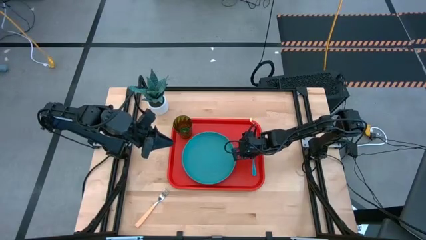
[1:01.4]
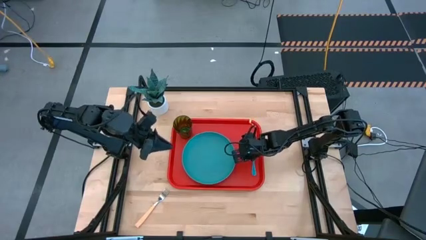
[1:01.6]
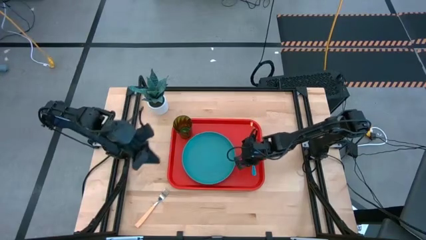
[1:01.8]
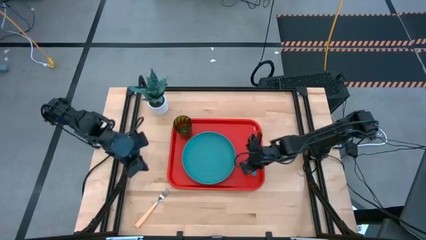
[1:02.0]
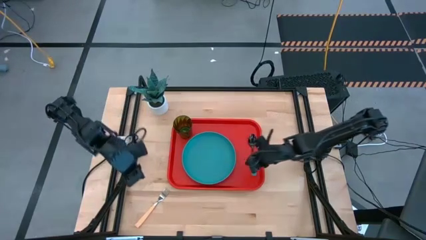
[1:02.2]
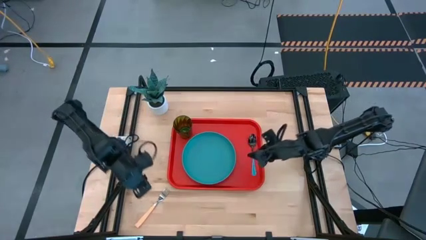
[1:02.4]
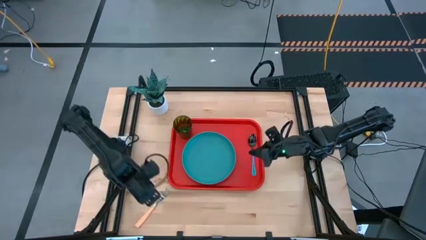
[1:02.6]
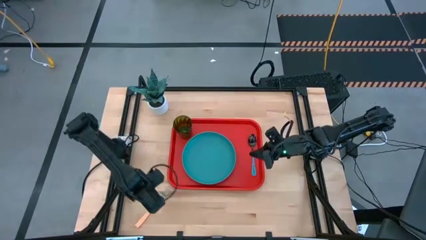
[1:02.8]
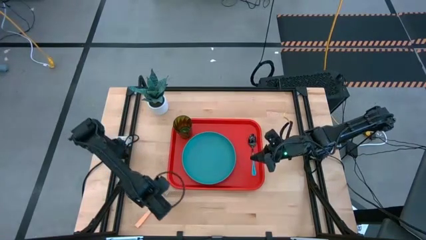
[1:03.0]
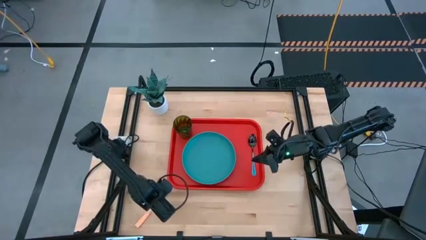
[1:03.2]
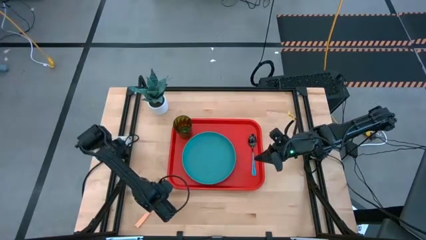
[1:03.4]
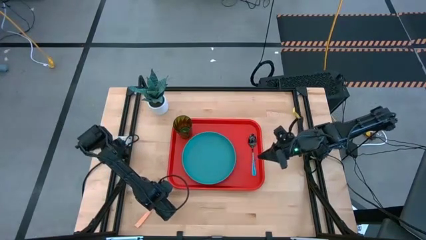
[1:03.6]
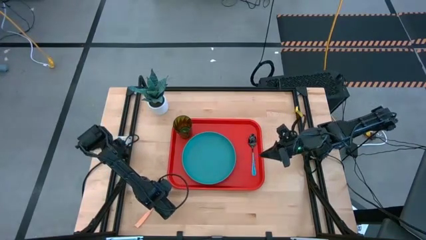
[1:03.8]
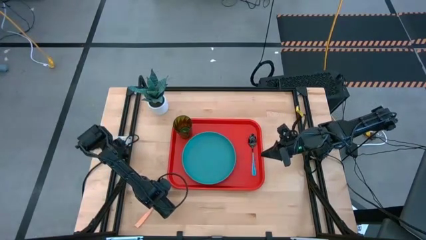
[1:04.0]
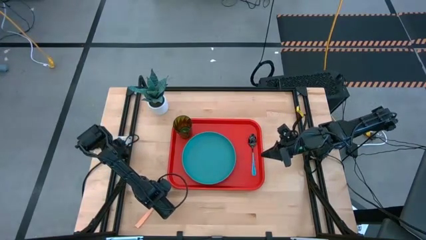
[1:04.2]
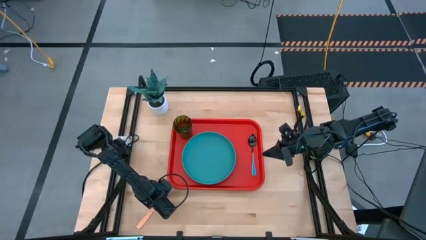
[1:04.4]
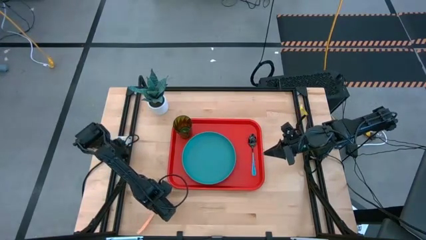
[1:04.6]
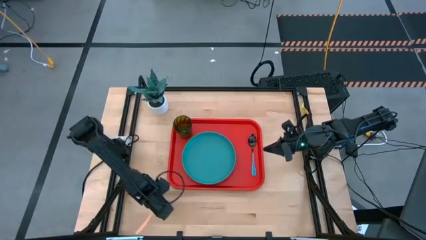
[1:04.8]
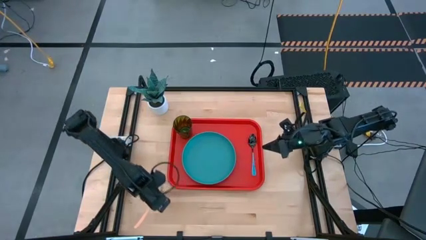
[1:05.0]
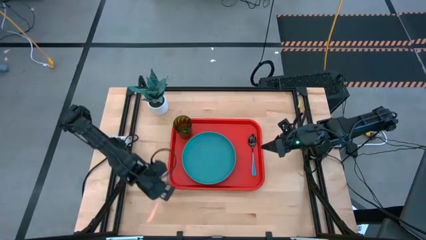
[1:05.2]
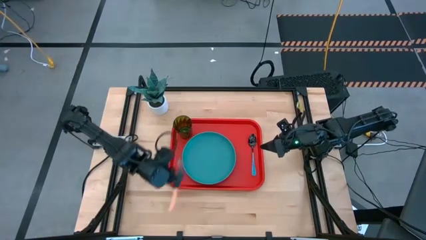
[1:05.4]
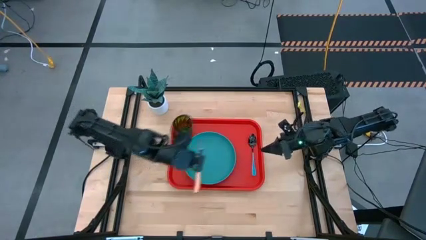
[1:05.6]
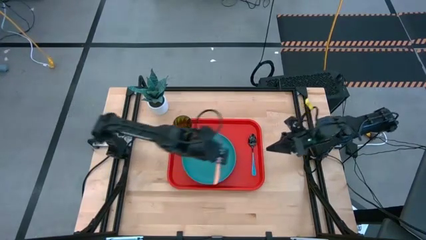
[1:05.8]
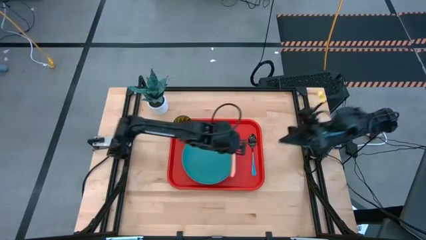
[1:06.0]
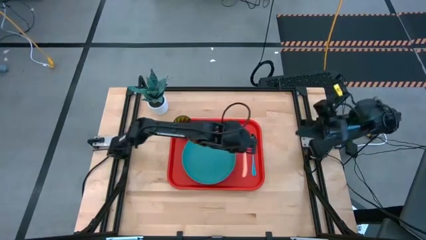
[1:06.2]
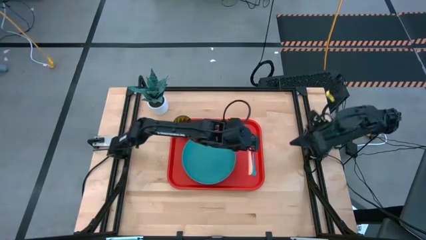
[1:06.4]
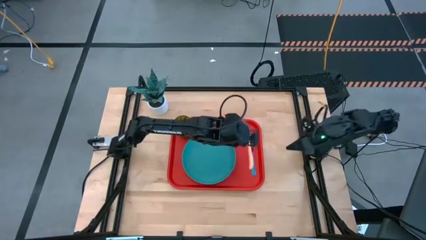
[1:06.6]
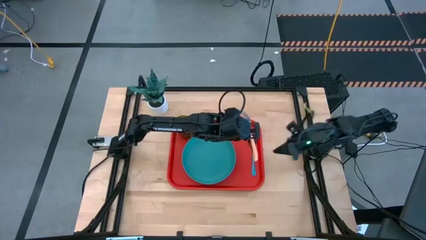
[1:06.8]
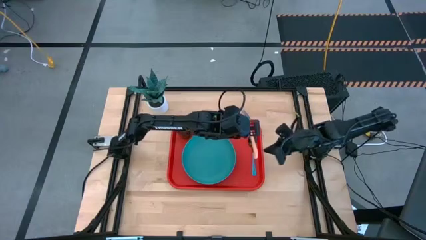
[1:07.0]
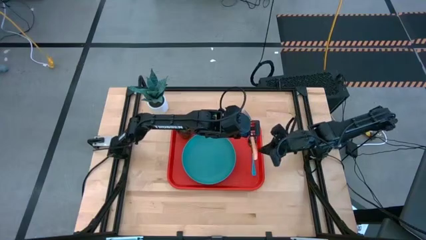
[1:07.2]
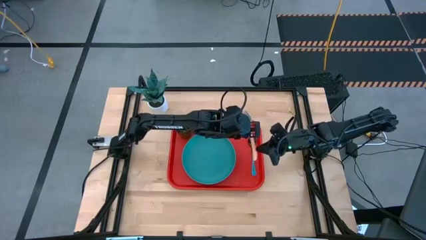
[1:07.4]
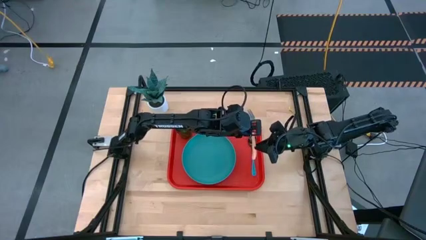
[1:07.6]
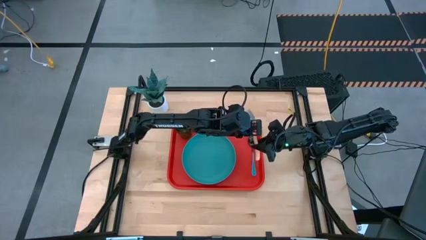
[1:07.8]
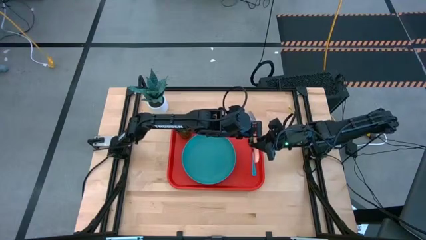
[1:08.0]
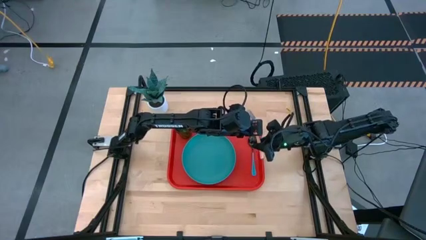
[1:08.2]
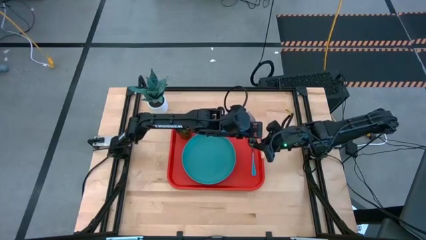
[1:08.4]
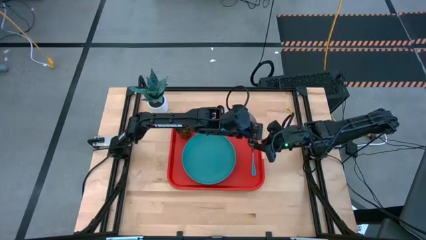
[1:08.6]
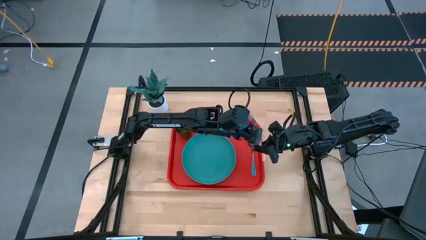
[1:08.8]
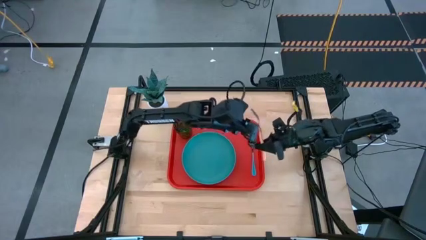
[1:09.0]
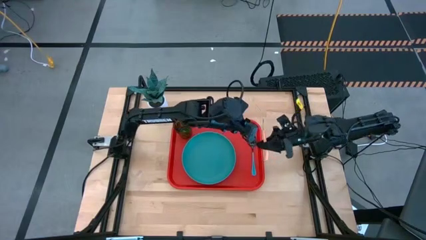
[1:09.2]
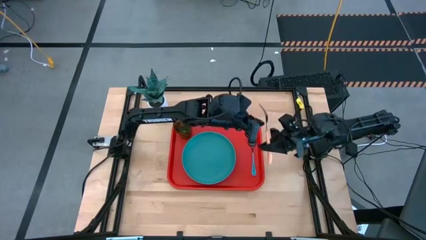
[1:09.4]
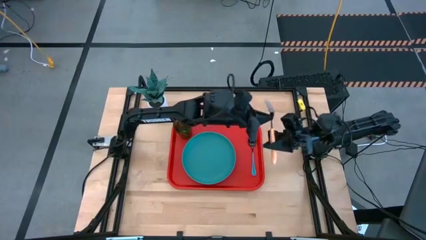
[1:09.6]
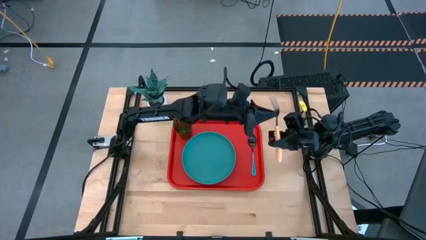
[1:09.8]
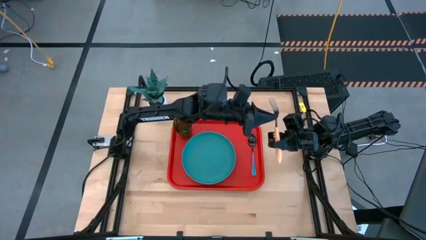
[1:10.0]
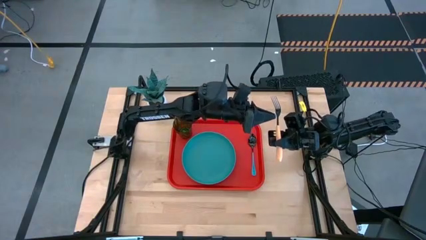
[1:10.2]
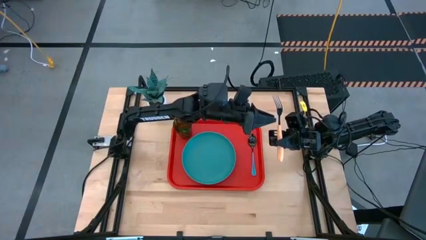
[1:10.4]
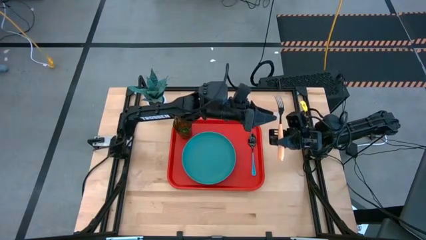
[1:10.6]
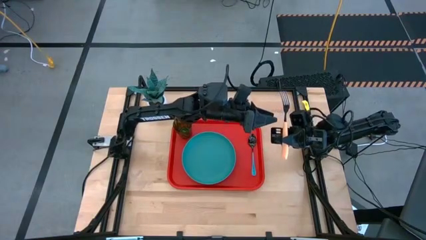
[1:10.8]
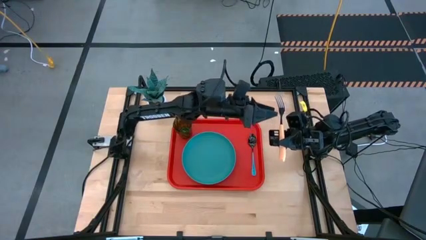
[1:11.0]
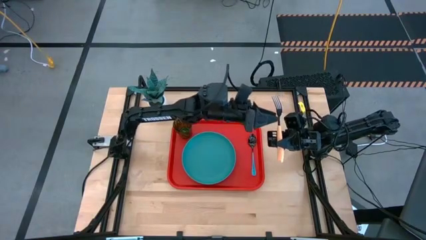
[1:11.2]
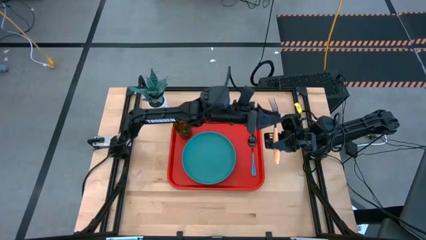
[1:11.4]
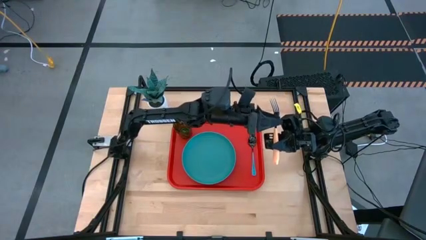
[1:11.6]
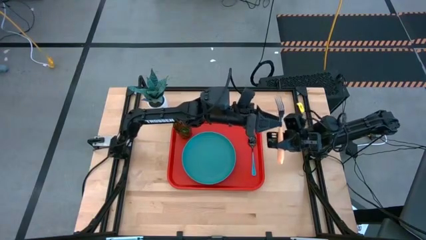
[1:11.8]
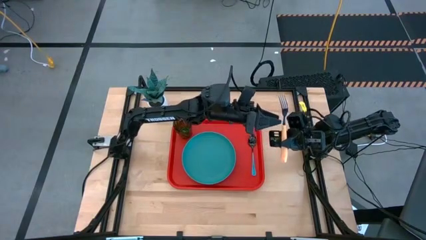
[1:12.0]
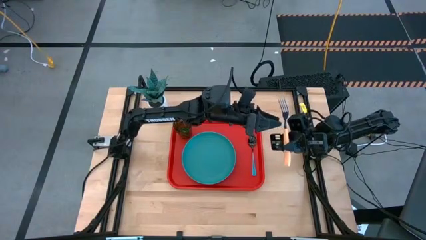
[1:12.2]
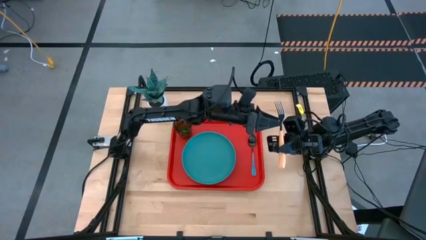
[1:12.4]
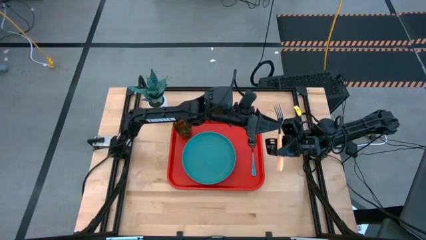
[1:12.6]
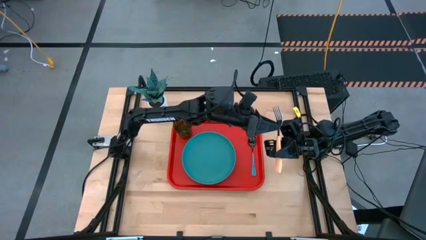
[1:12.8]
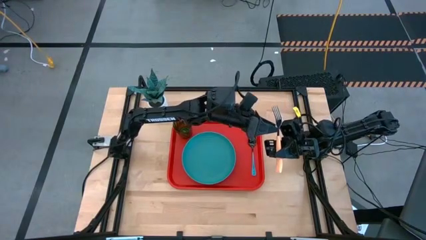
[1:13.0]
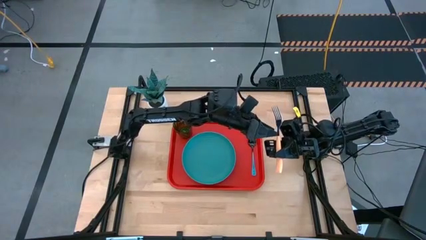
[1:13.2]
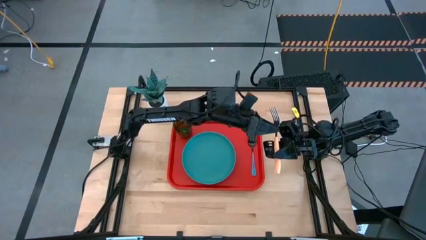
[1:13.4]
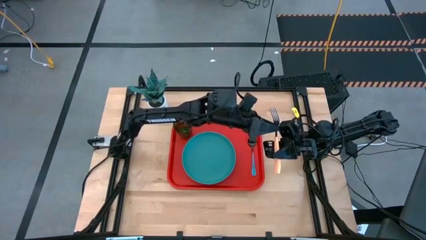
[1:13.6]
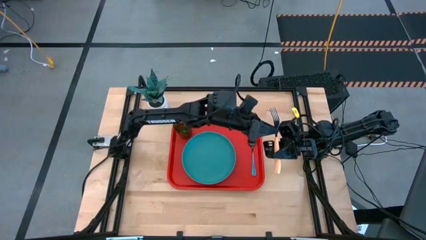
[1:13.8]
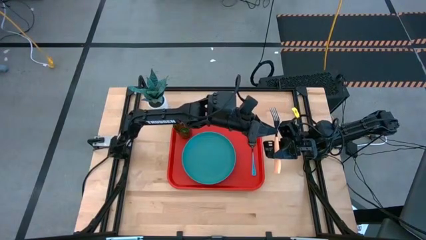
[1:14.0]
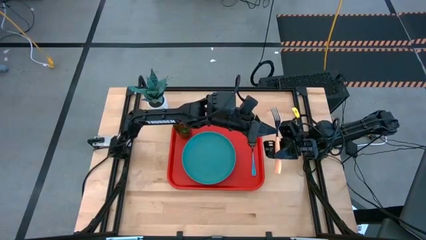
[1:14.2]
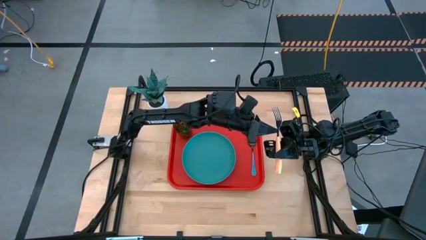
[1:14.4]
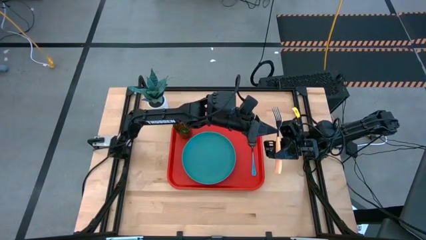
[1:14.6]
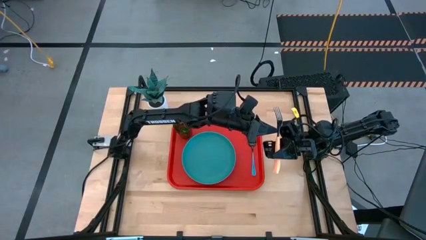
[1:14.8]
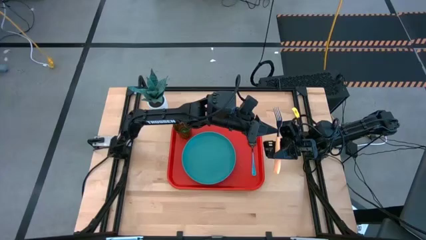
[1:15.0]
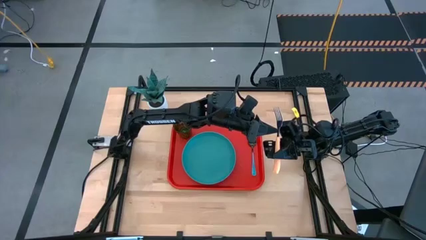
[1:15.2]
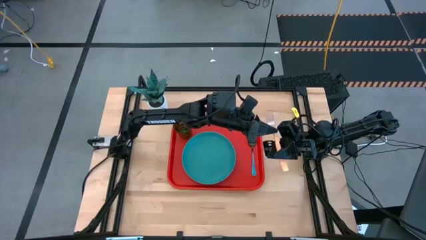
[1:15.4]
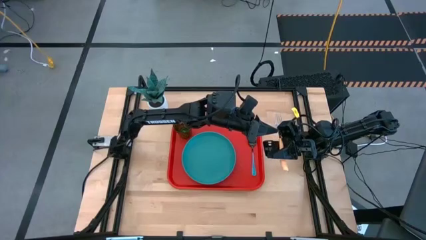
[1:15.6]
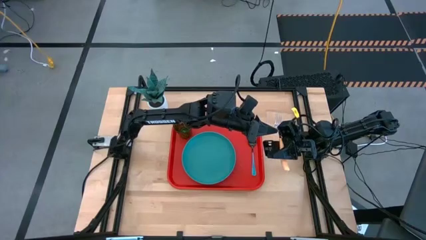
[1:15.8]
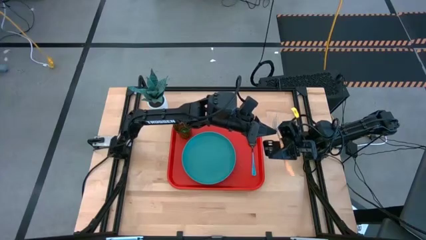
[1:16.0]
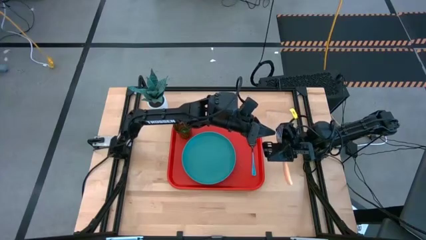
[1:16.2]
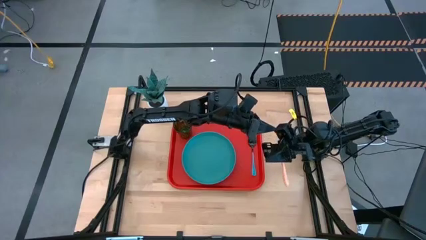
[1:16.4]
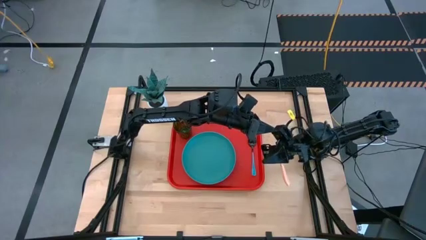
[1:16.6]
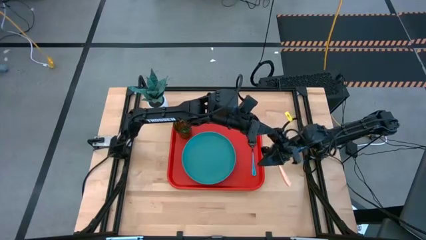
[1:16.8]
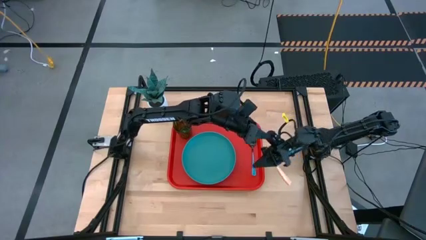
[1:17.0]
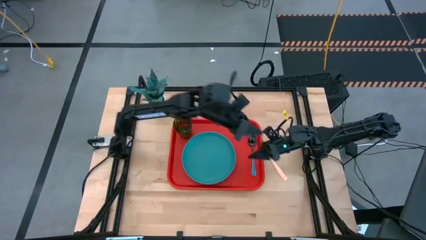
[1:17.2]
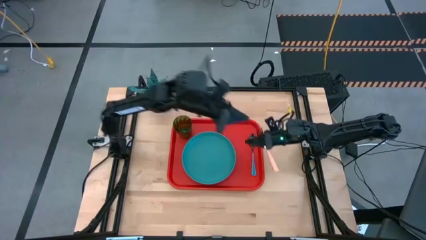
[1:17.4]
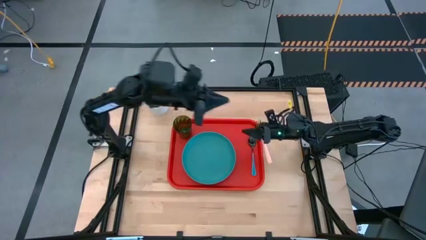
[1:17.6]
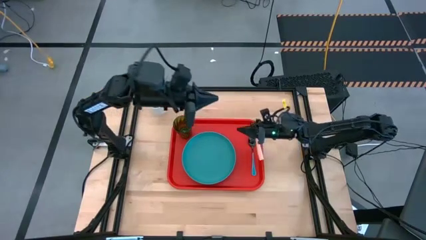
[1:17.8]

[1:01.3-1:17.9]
Task: Pick and place plate/cup/fork/spoon on tray
Put the yellow fork on the red tray between the blue plate and the blue spoon

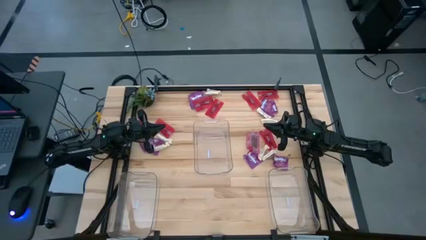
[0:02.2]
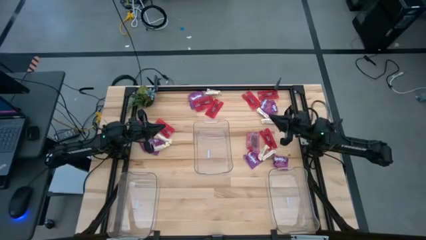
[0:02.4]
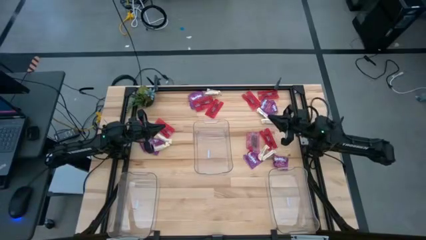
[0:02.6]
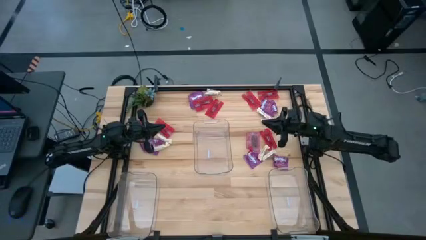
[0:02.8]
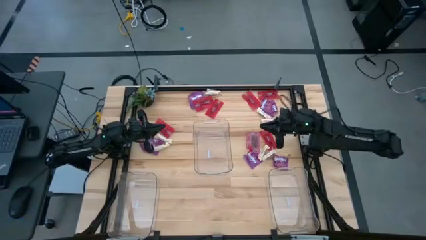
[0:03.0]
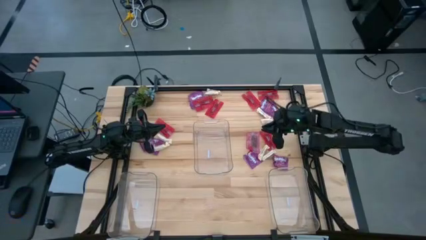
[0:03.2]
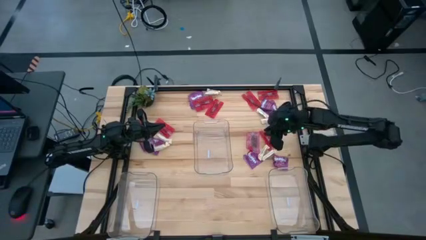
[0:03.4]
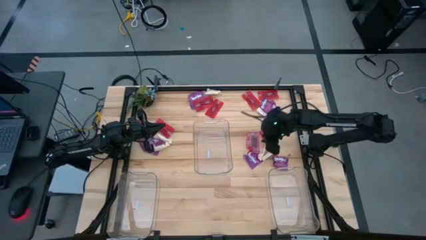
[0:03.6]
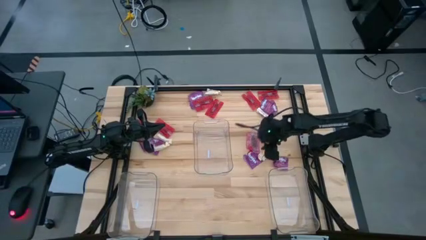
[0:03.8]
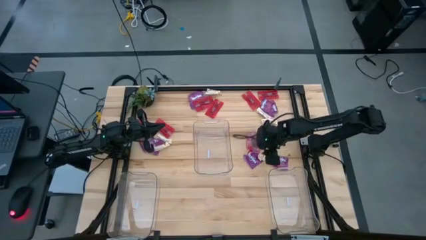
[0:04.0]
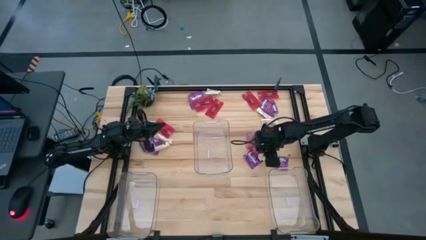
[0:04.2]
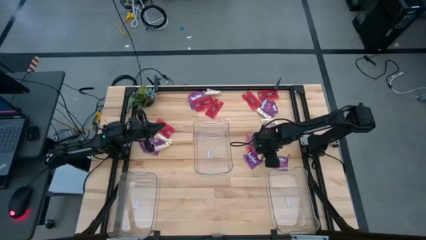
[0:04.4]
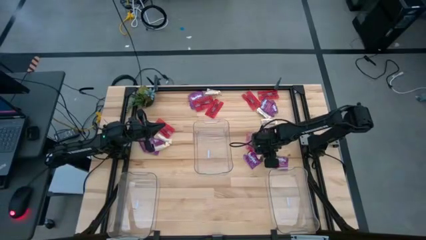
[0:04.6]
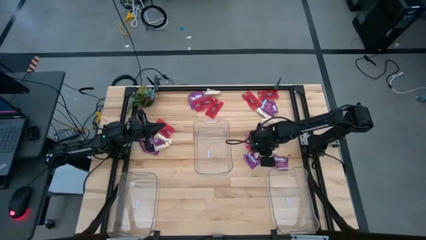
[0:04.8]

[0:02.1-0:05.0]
Task: Sort candy
Put the white chocolate bar into the right transparent bin
